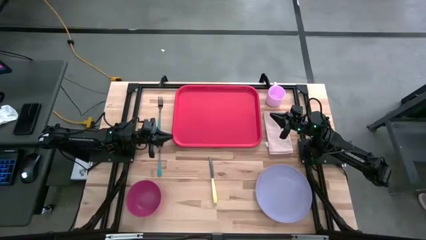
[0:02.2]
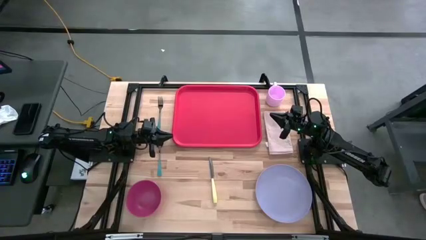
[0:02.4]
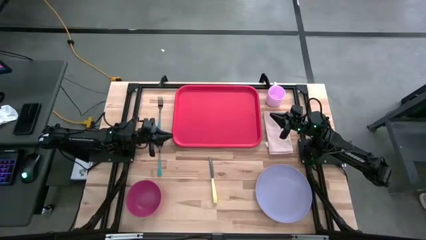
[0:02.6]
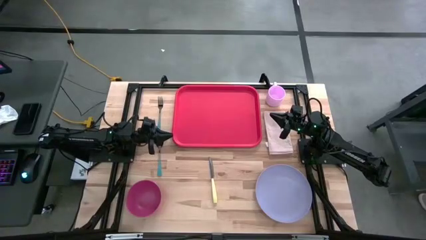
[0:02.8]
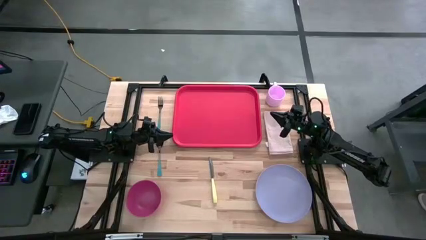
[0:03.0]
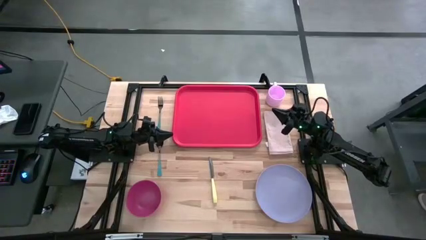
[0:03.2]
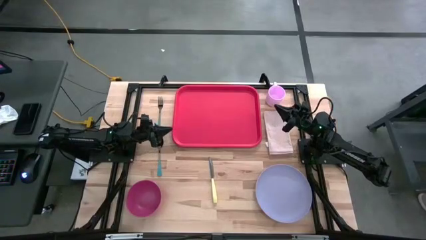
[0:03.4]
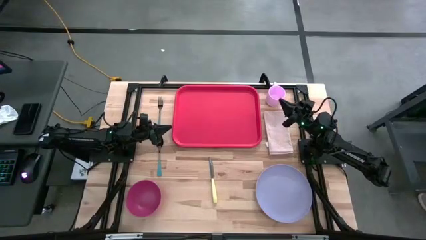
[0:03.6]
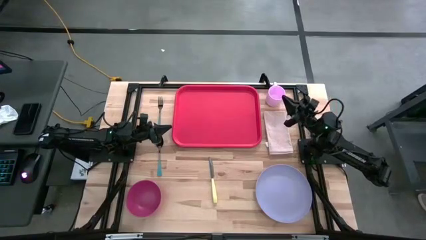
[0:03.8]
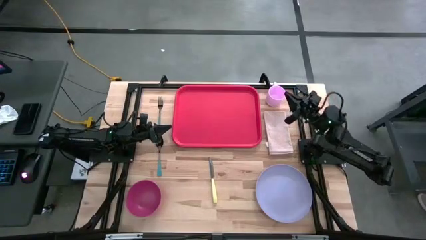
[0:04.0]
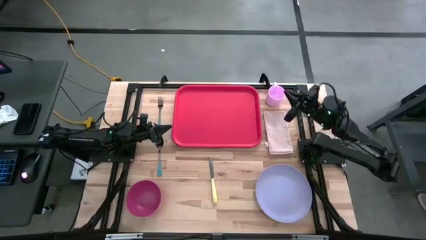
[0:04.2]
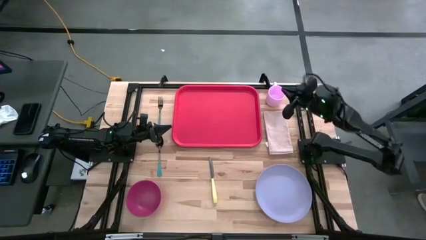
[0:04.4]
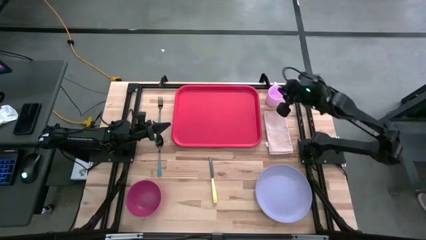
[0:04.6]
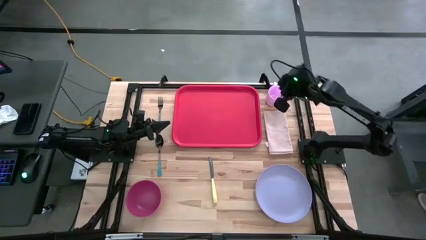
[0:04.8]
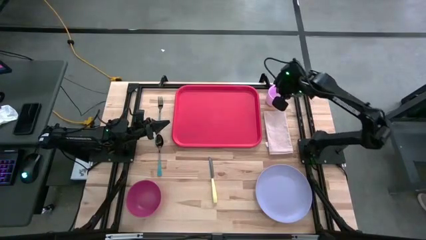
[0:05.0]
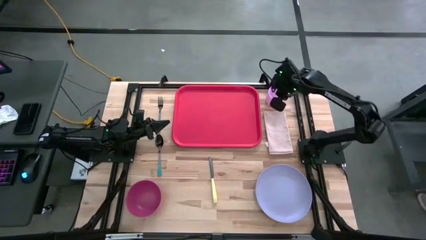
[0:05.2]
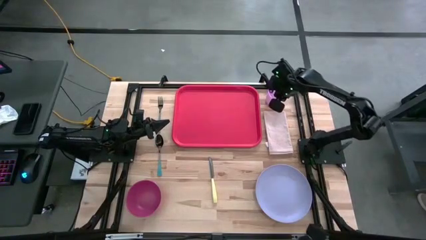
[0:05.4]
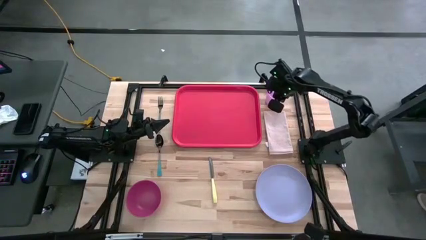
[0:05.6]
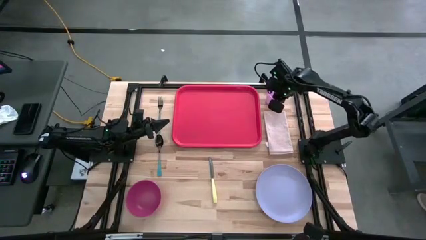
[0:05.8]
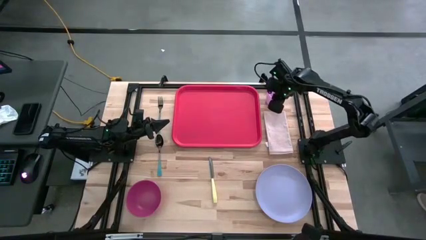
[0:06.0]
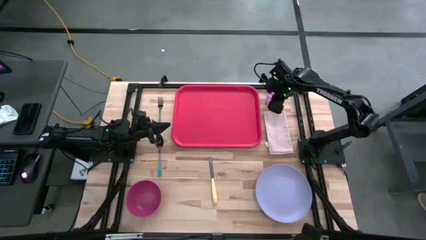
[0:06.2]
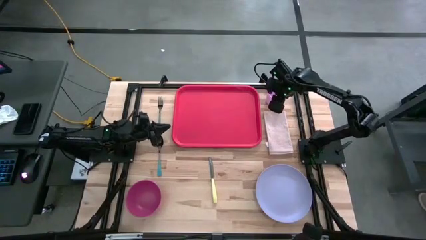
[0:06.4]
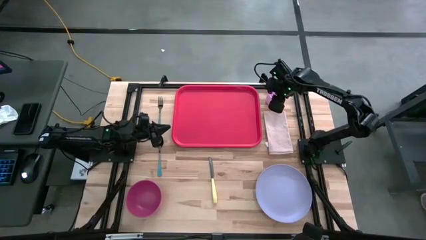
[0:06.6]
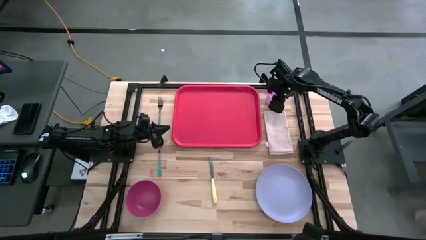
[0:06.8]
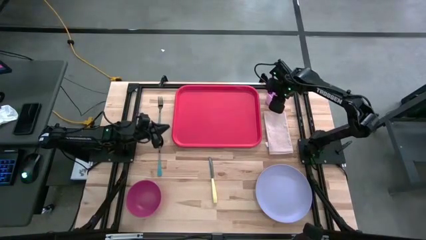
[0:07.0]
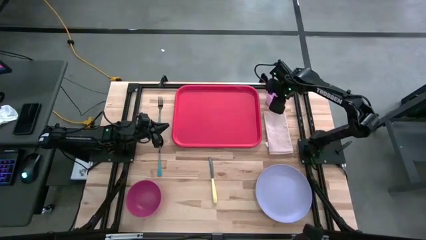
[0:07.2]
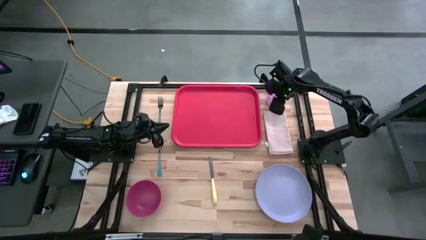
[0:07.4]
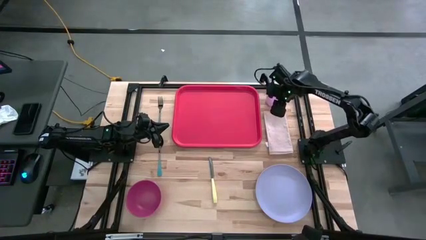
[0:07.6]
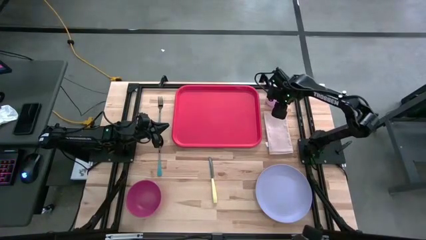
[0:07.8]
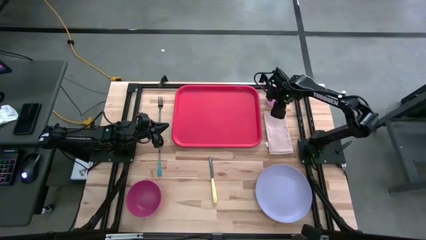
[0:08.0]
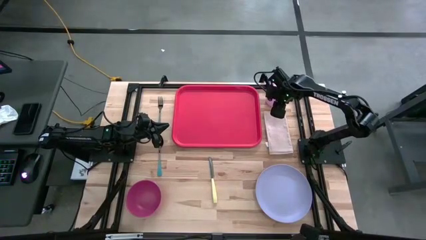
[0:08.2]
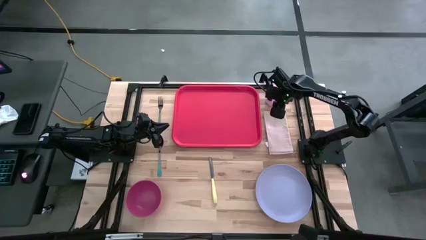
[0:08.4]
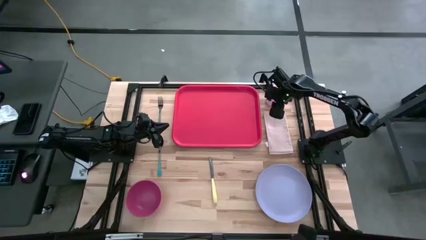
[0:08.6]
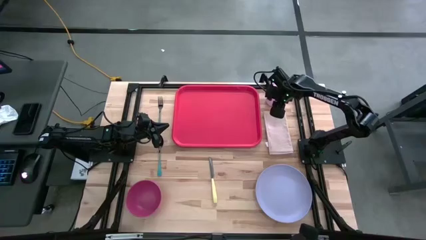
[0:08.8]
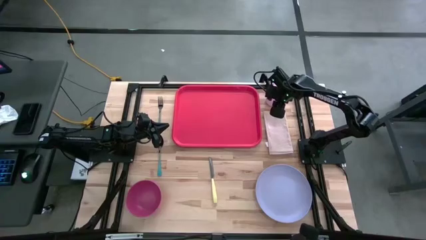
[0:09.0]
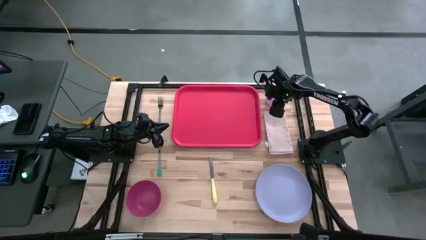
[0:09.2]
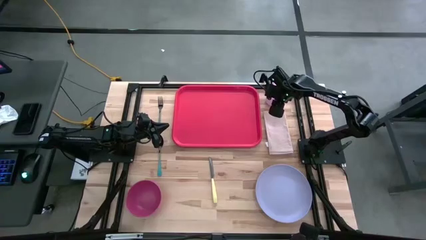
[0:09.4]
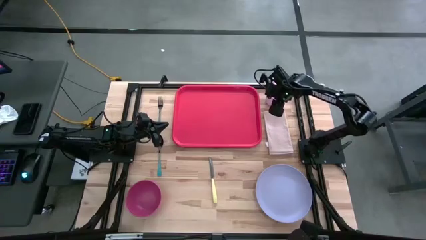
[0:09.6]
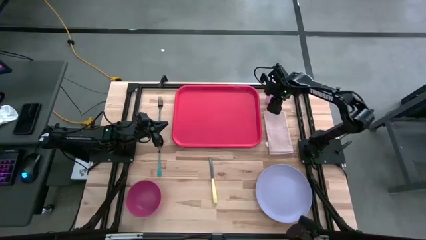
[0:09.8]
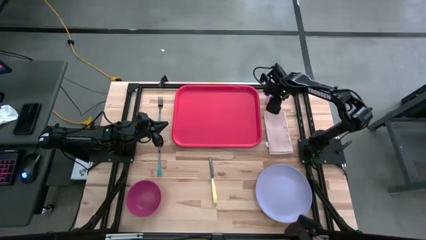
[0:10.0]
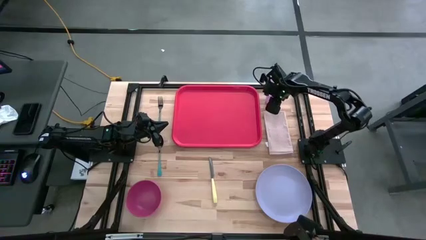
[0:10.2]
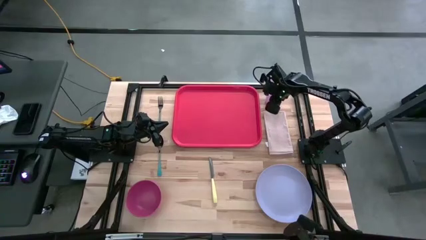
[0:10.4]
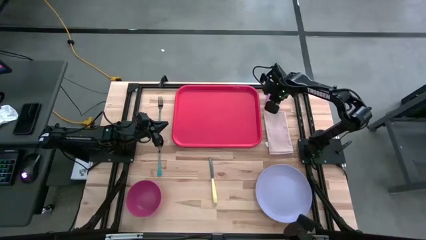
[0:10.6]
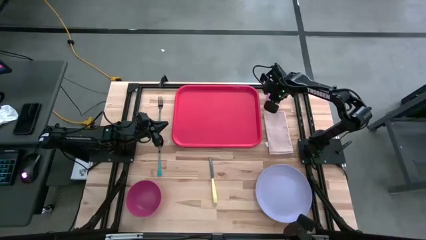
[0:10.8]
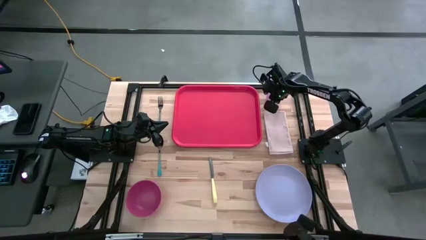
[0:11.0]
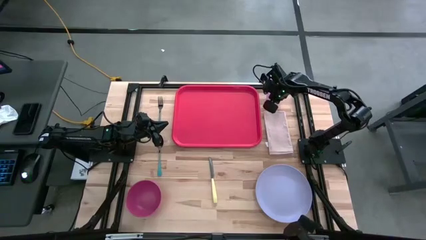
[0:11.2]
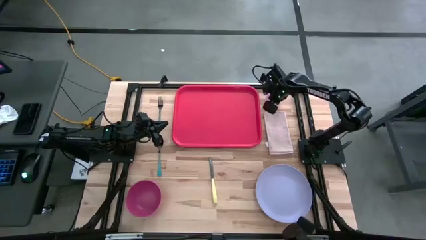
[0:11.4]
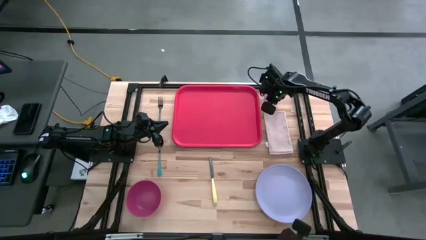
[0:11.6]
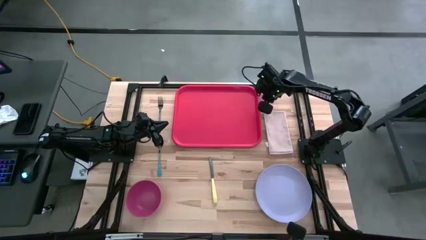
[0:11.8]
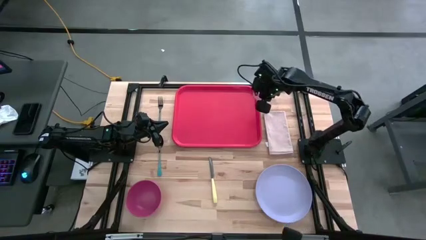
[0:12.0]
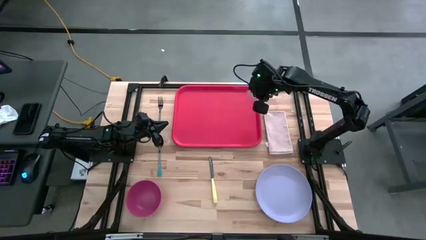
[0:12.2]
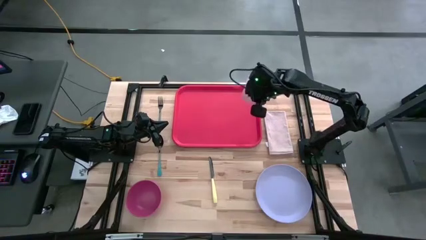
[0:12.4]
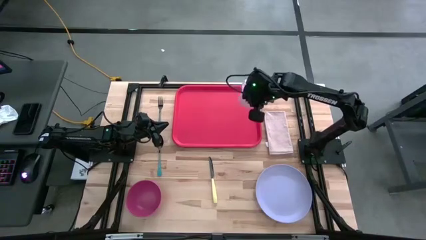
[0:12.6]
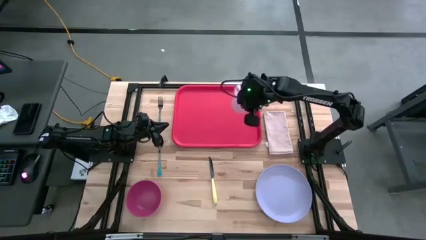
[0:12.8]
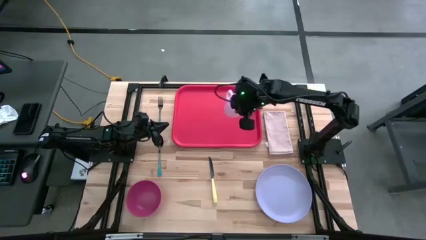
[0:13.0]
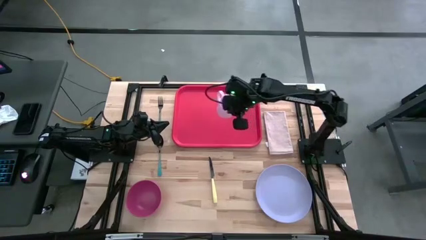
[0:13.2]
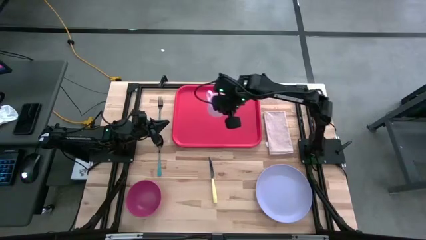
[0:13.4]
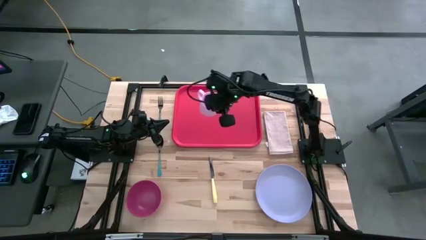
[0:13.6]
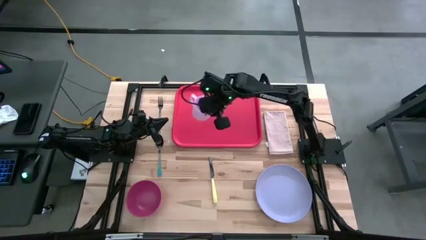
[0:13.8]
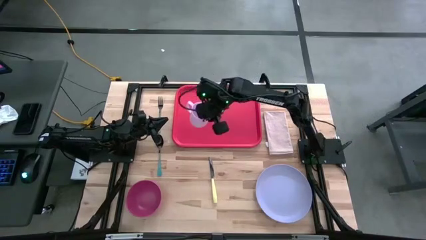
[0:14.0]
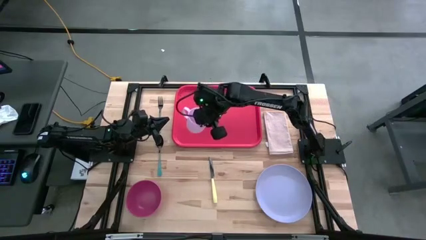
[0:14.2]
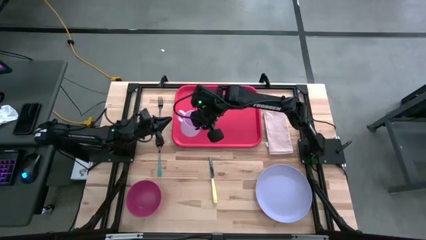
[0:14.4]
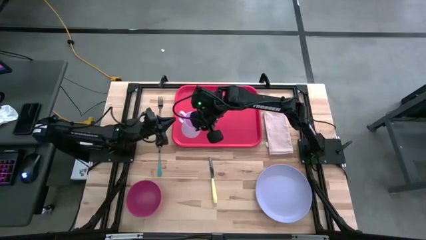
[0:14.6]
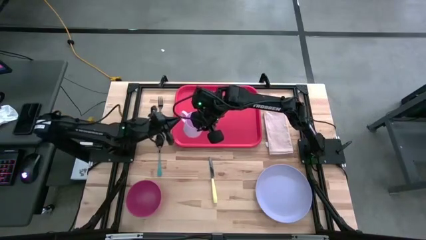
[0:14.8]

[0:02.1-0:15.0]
Task: Set up tray
Put the pink mug on the red tray
